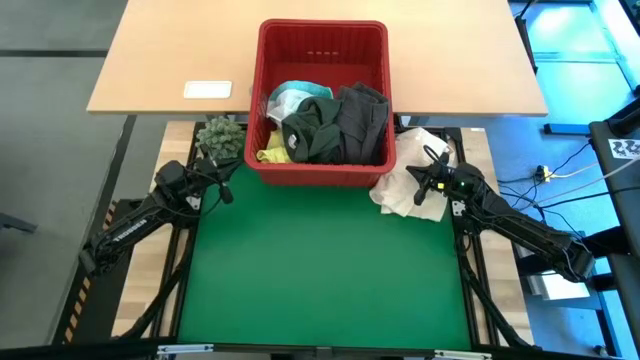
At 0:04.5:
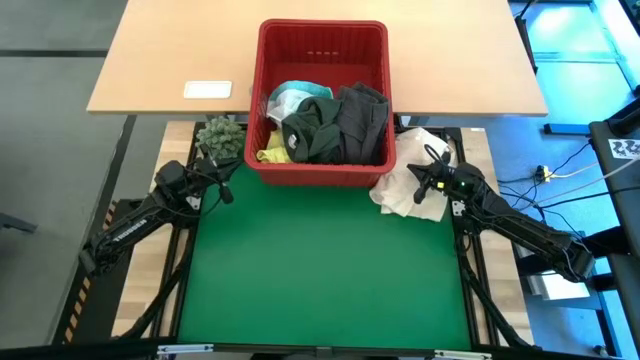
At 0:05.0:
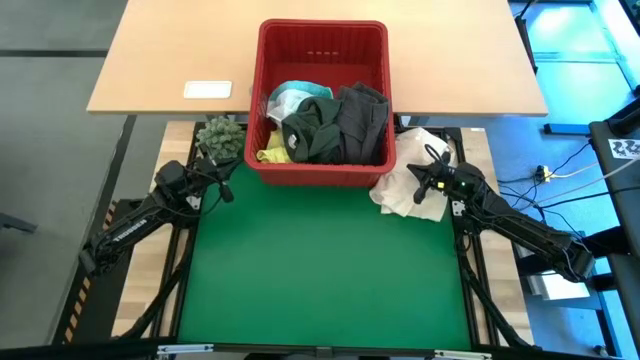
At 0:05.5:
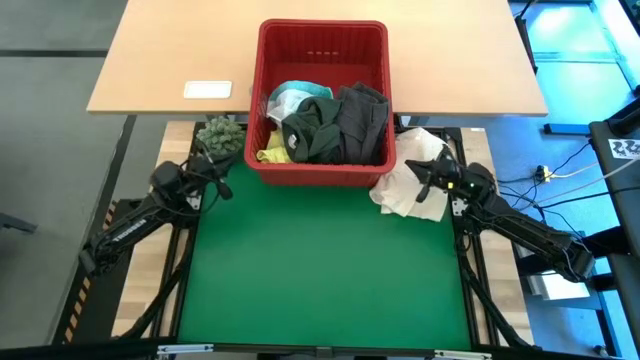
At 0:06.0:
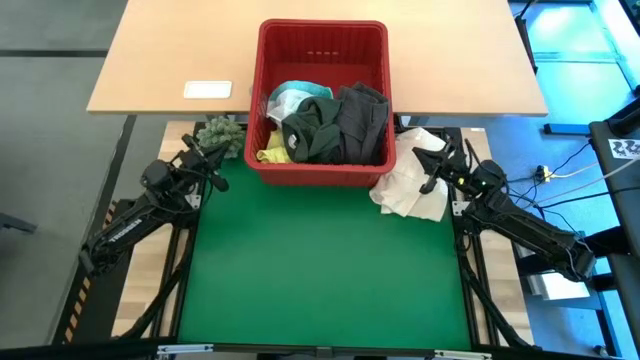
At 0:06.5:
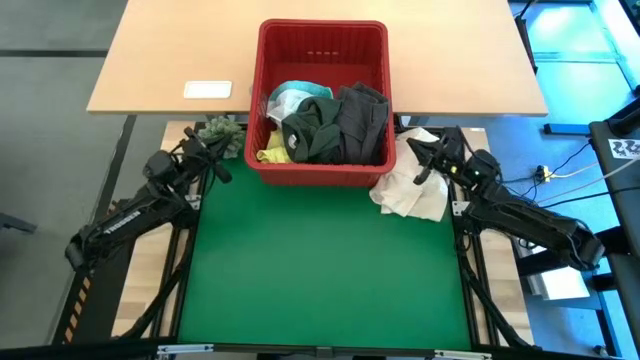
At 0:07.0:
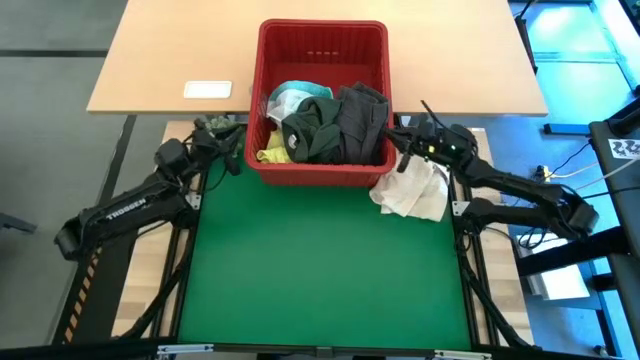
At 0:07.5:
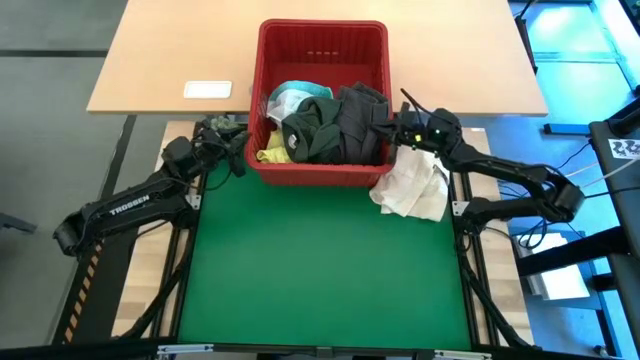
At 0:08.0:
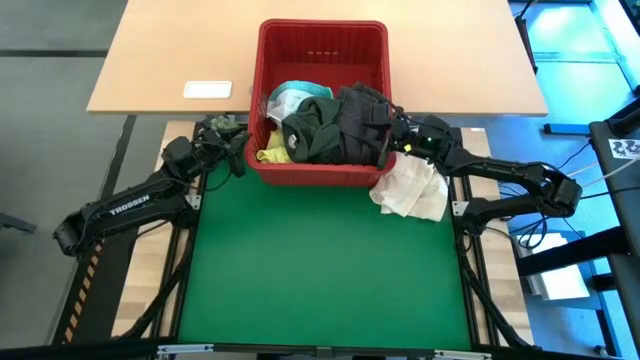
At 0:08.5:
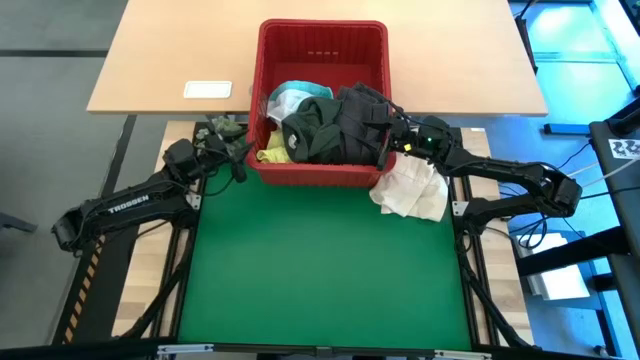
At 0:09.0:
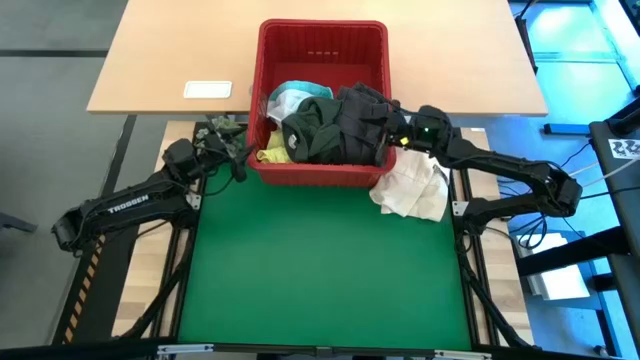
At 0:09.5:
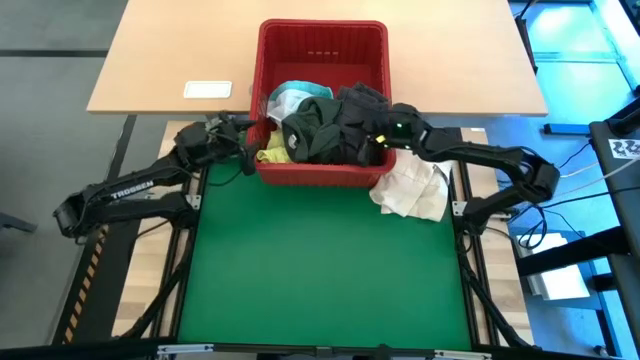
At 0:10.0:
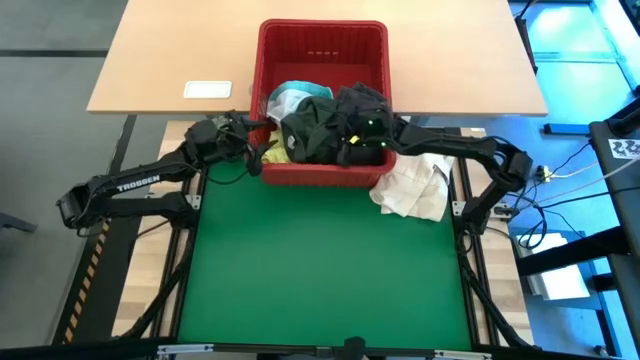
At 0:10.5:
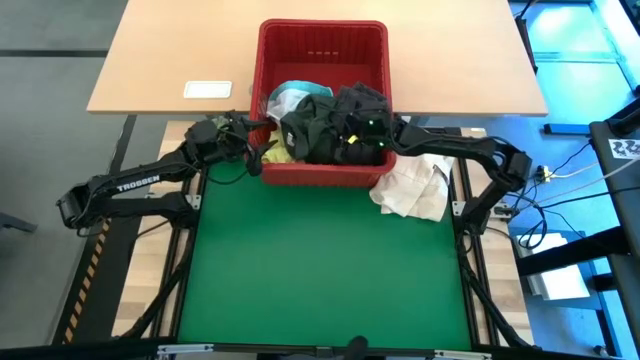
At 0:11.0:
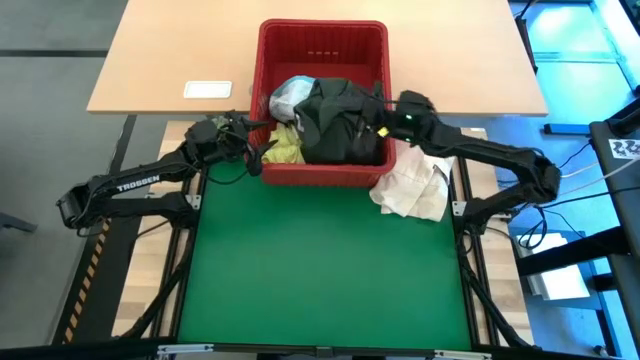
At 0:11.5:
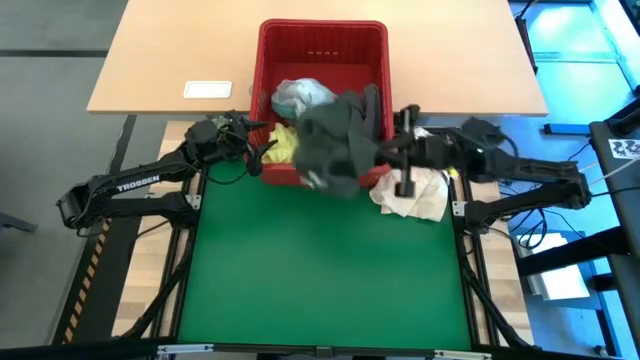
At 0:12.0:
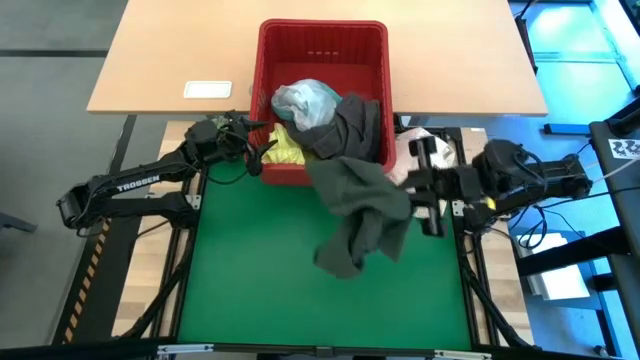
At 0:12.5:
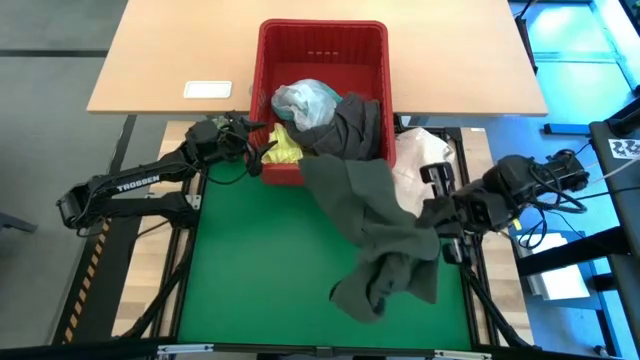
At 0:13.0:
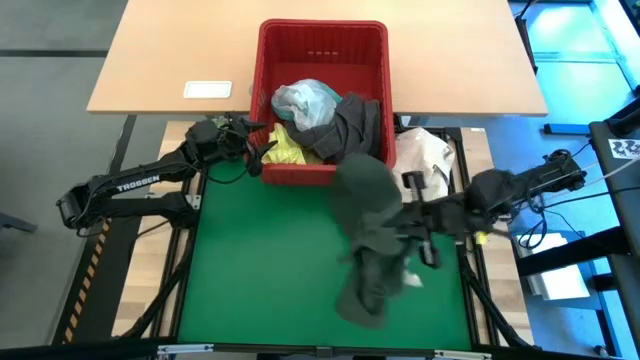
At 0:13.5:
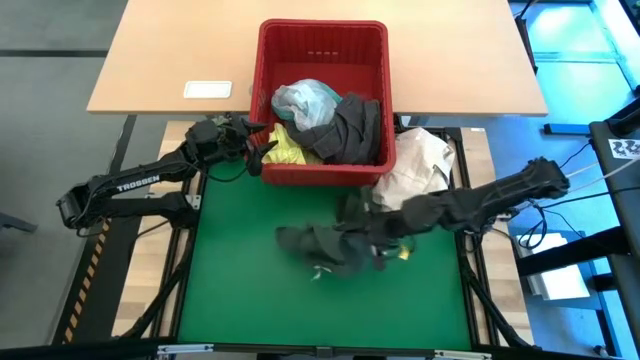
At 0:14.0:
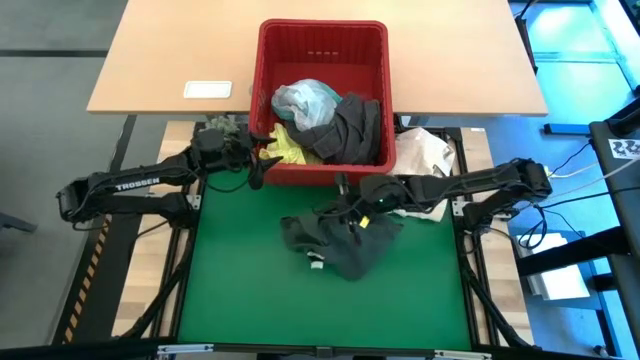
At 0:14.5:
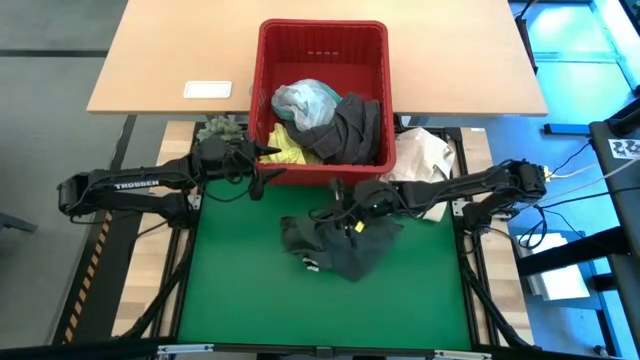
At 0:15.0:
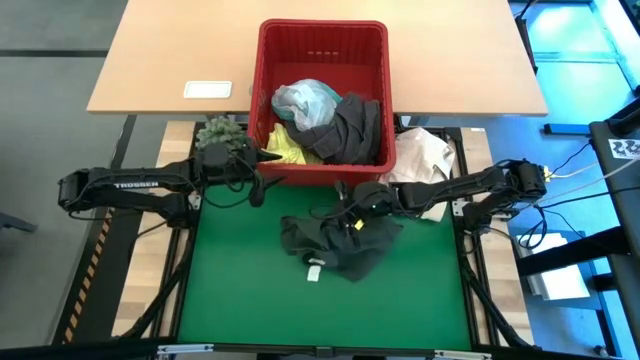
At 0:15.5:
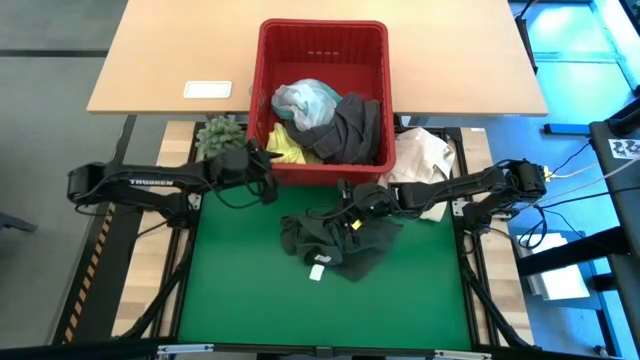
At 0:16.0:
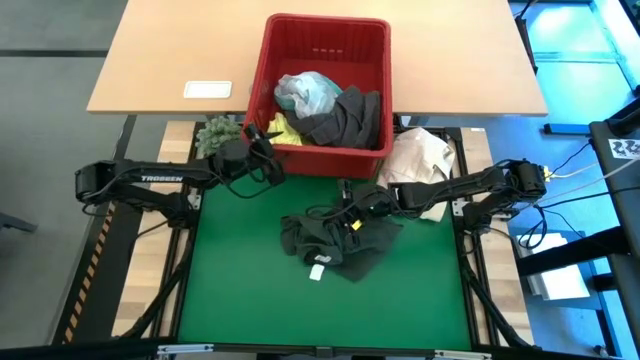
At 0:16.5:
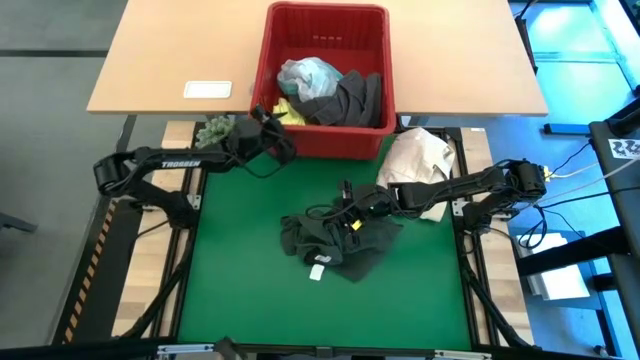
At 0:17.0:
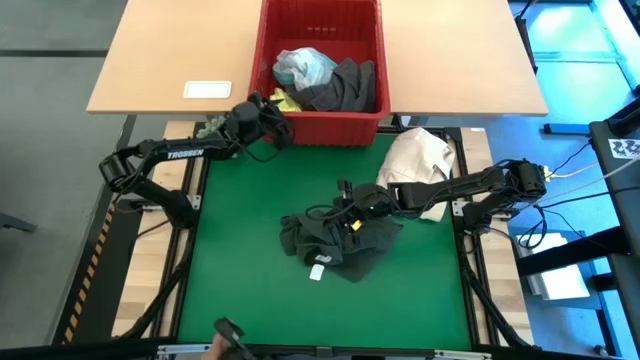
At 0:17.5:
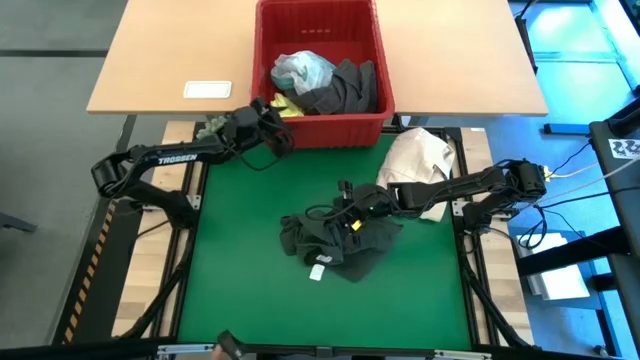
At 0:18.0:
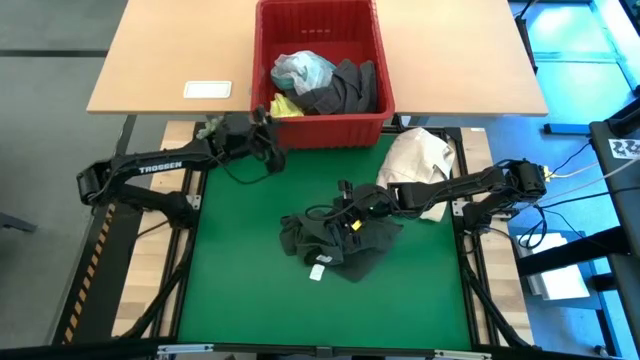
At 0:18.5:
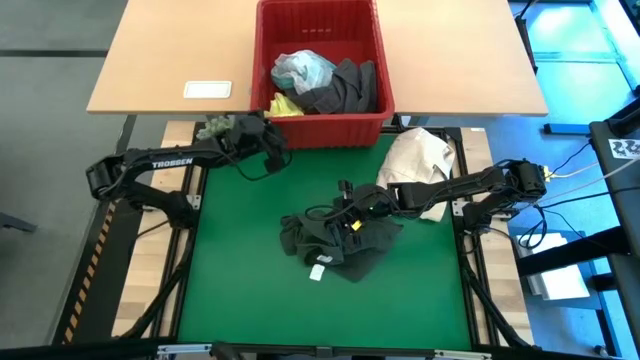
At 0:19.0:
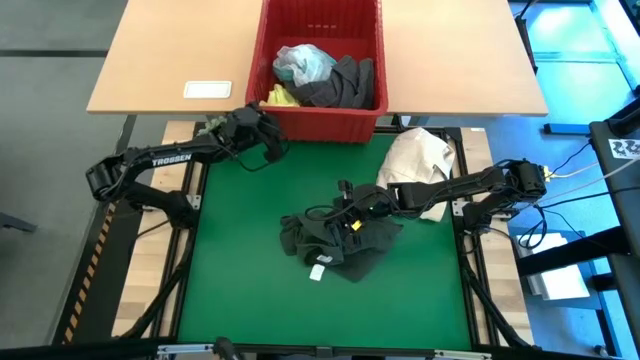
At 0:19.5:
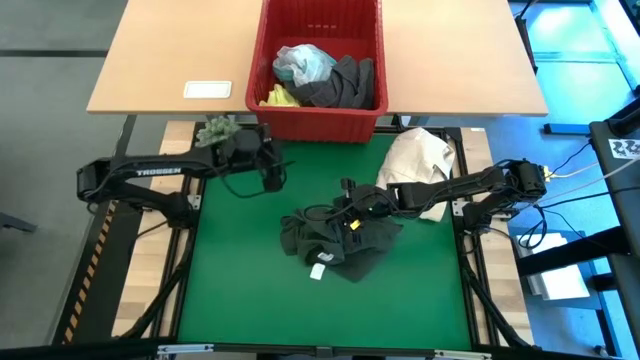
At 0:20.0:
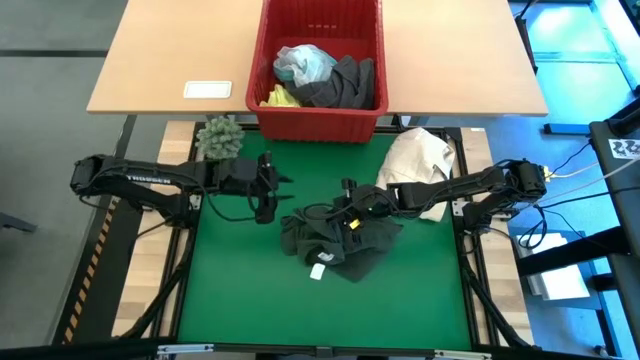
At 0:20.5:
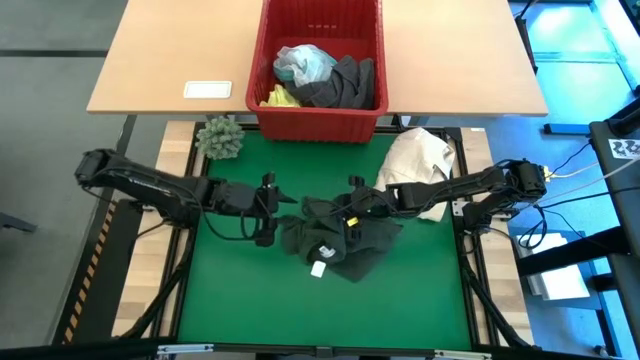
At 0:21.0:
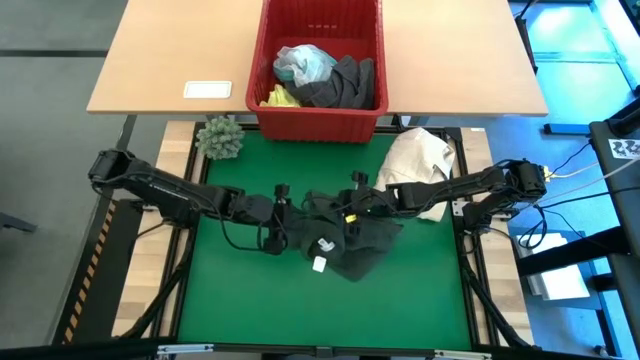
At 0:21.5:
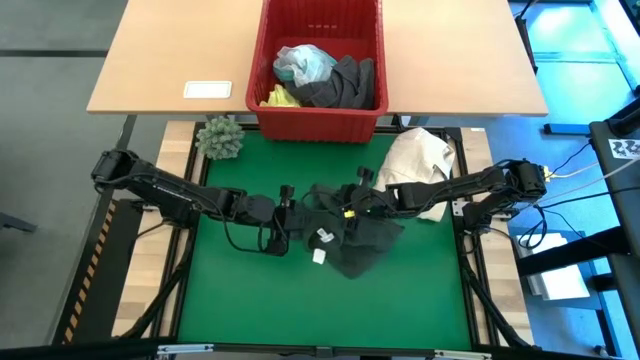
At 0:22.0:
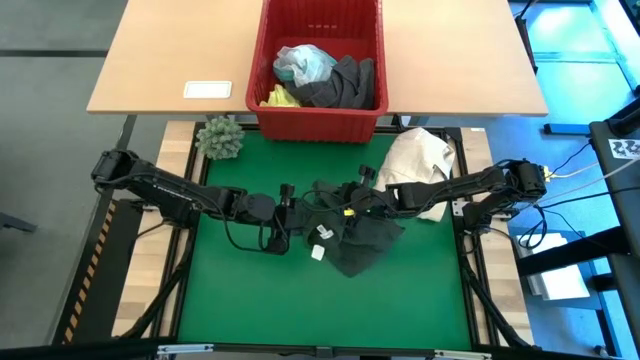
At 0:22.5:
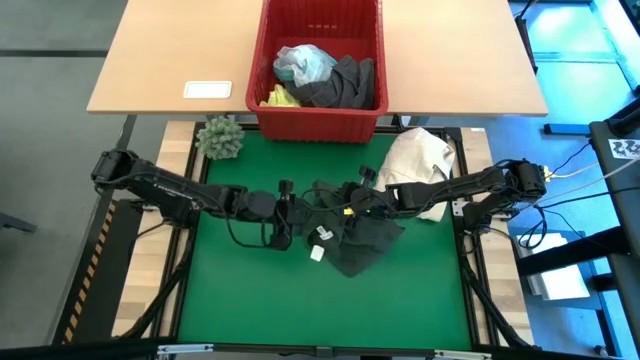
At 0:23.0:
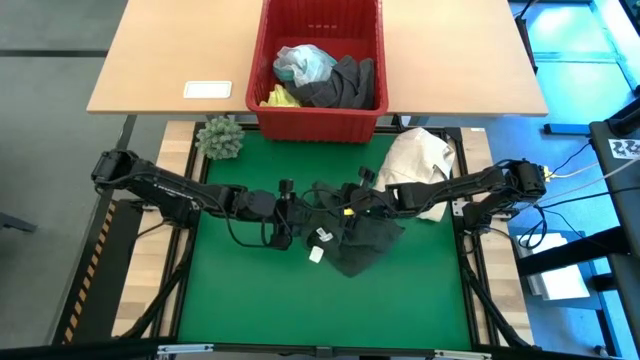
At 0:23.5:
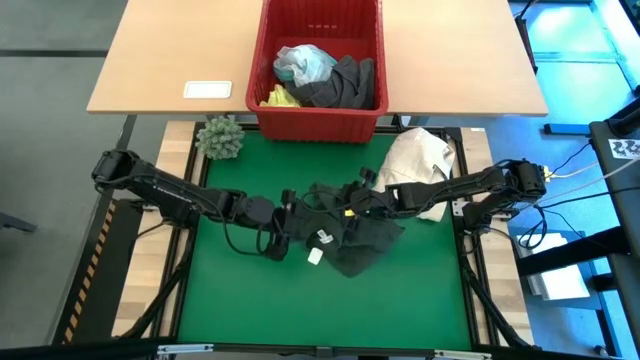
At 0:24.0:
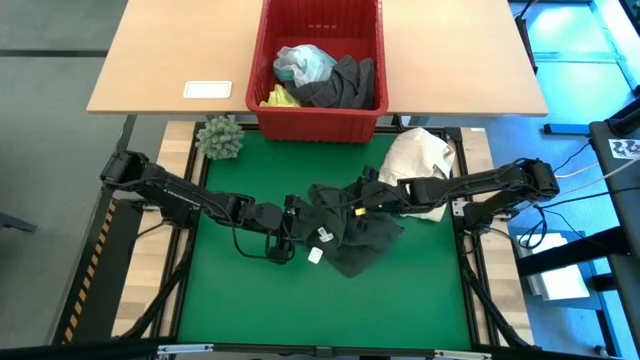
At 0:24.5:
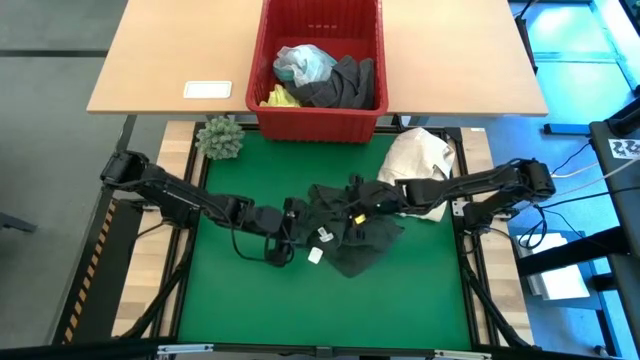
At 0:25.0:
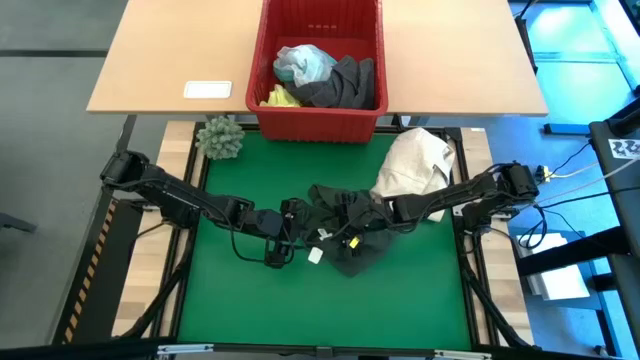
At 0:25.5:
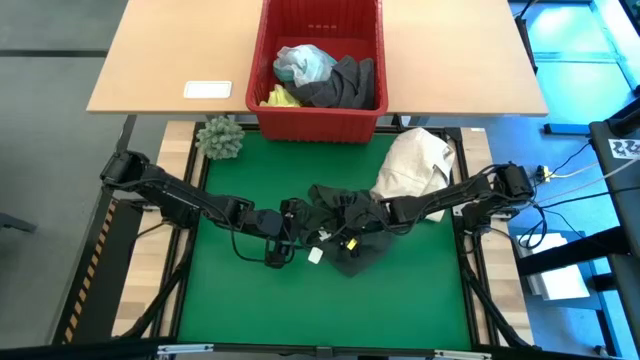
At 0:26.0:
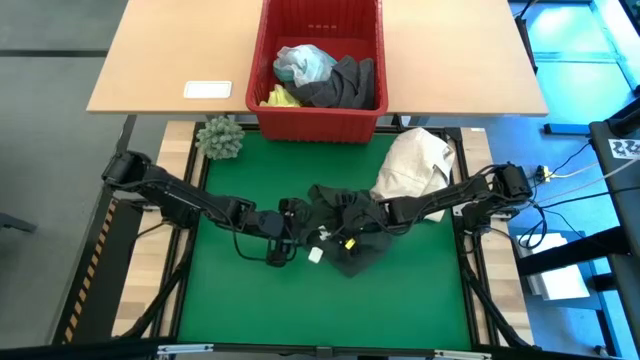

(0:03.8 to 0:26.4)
Task: Fold Laundry from Bin
Fold the dark green polo
